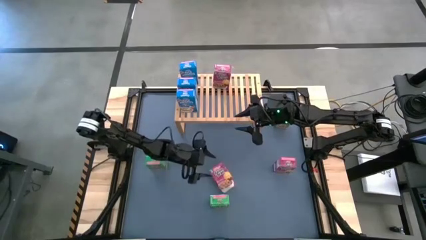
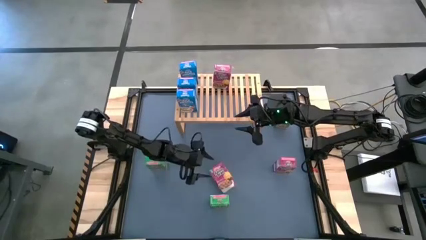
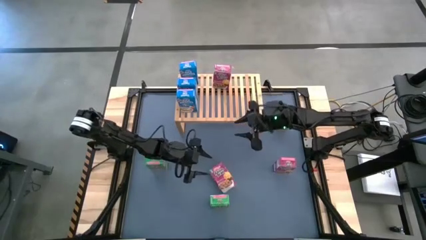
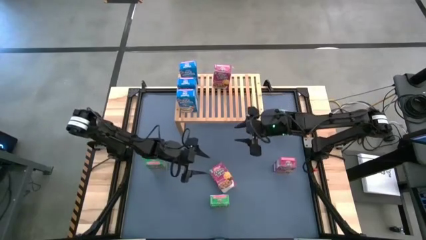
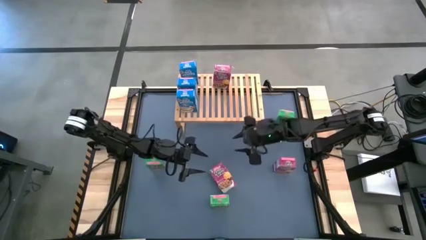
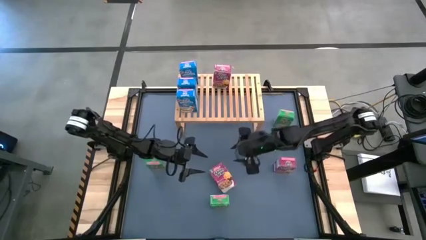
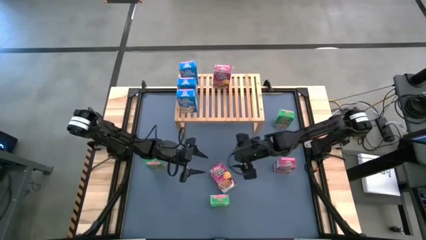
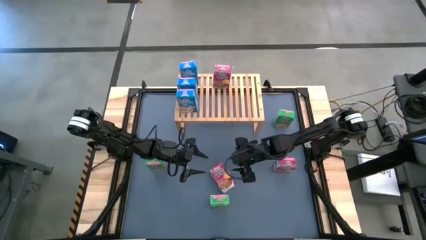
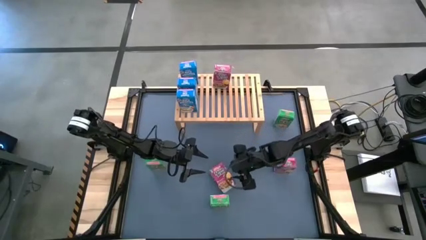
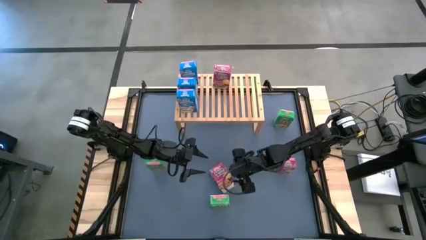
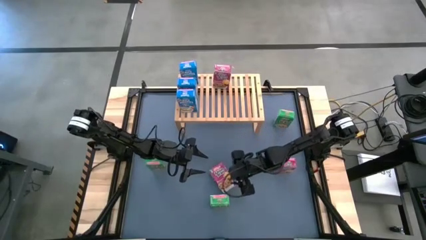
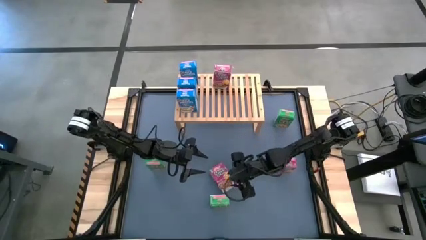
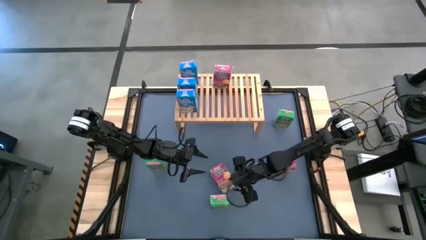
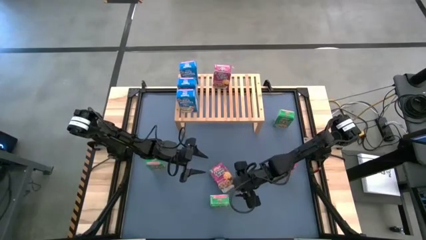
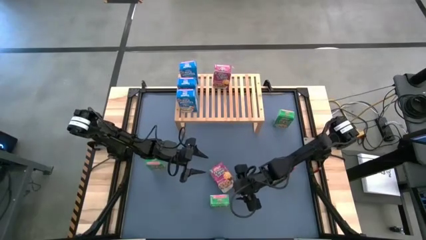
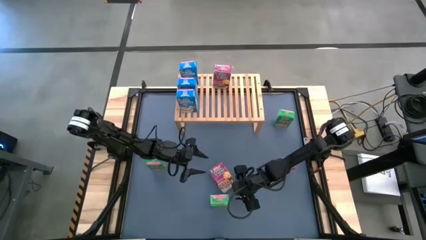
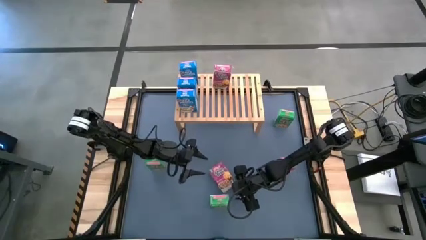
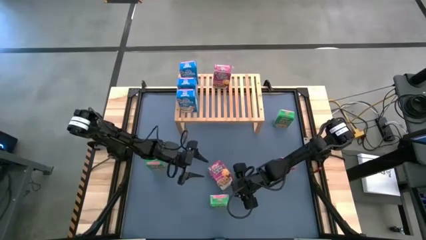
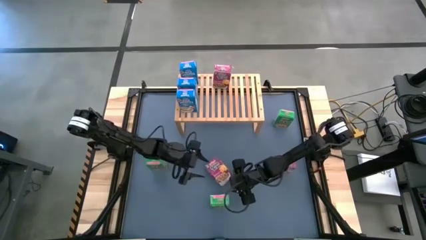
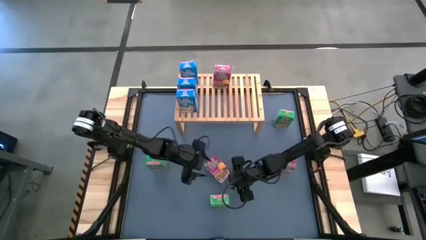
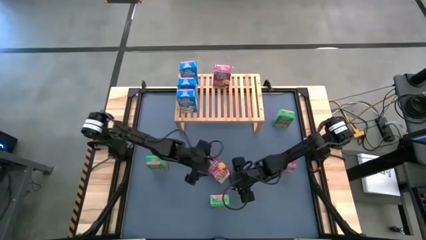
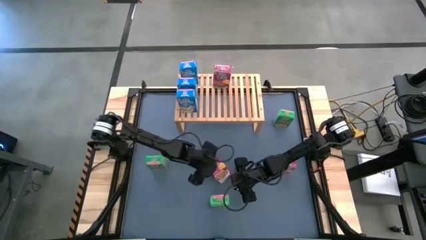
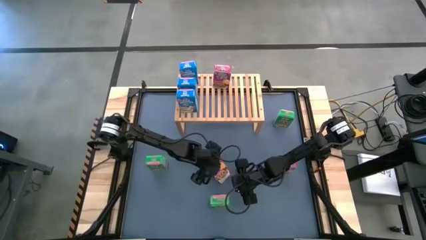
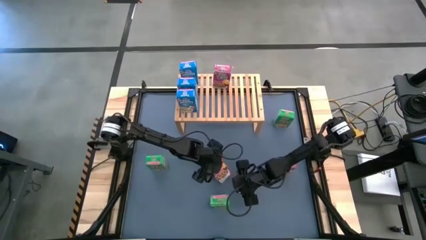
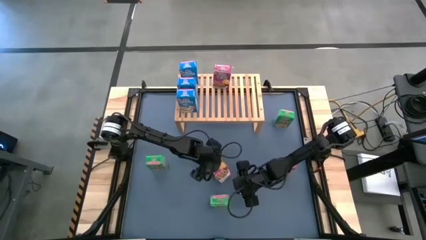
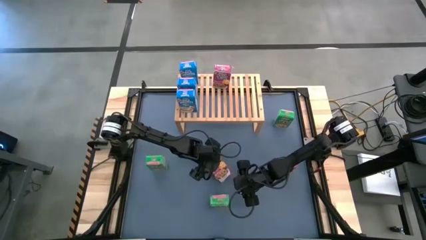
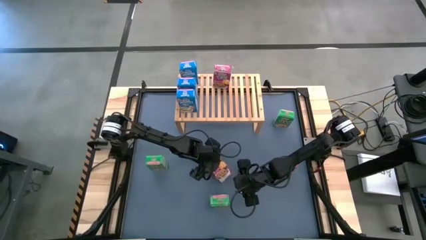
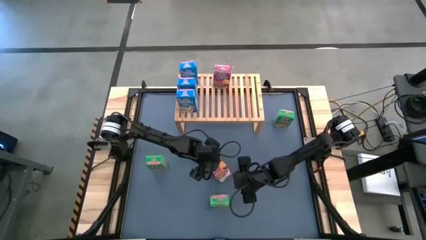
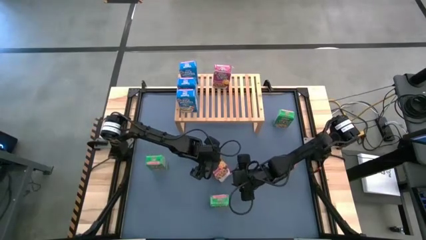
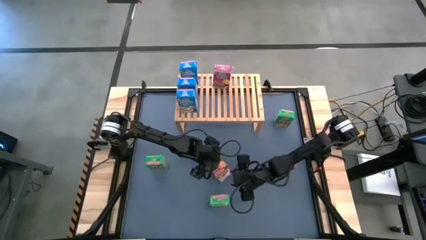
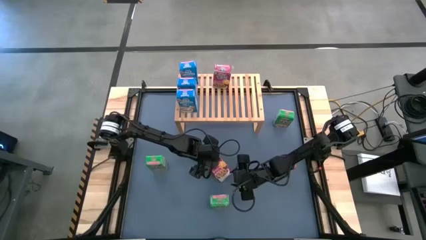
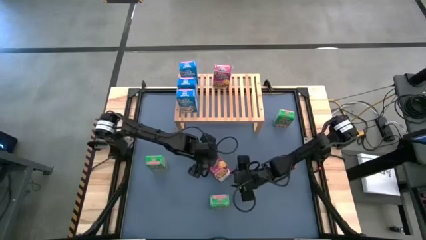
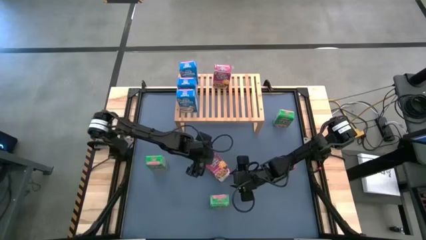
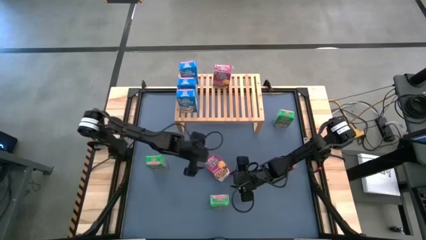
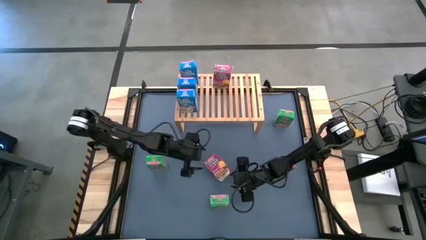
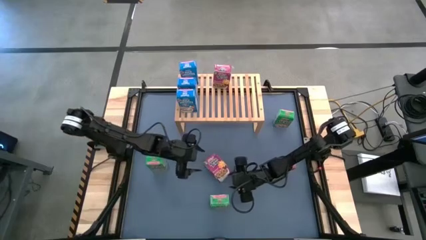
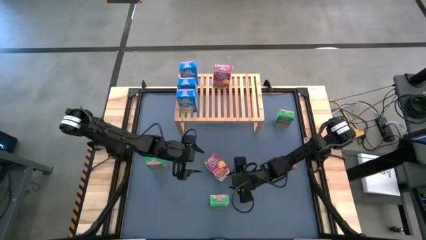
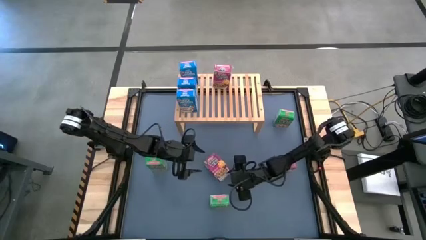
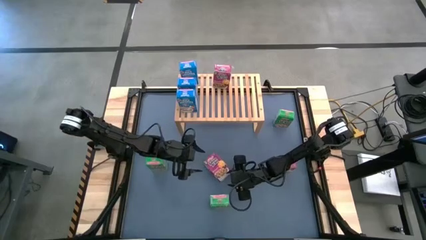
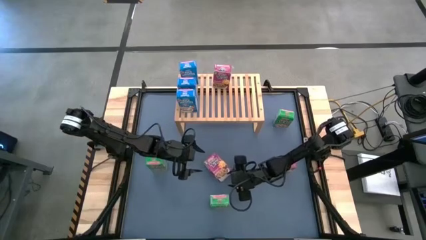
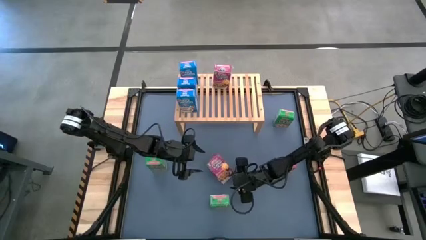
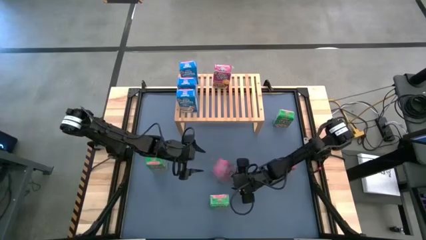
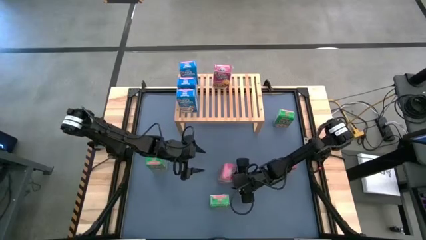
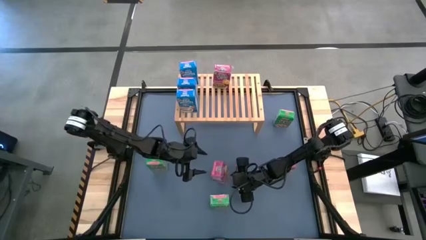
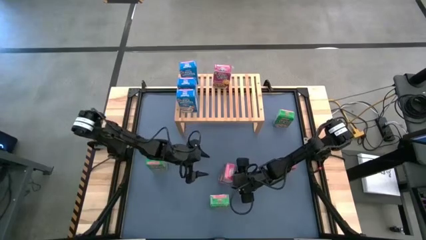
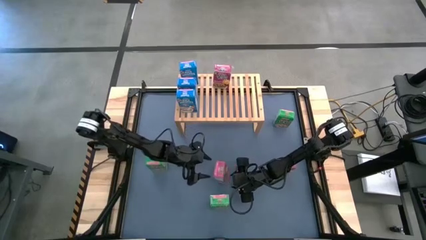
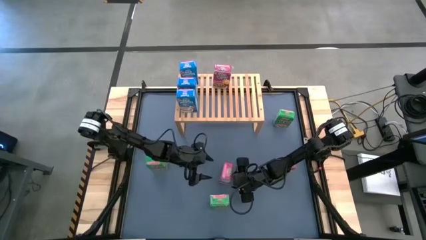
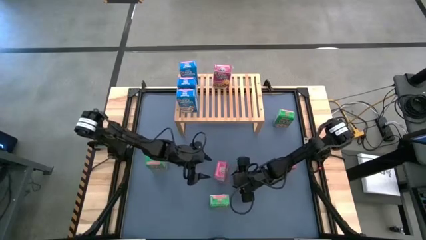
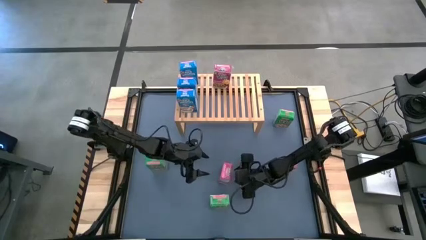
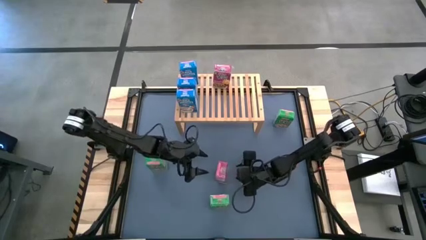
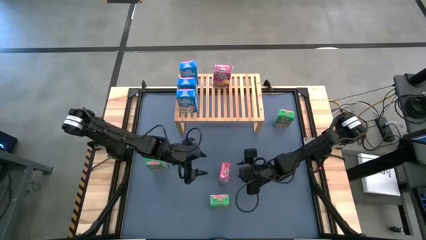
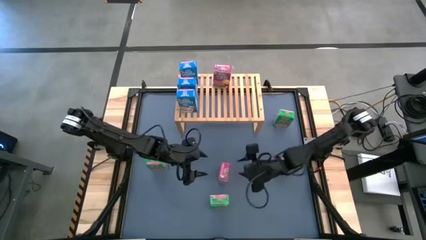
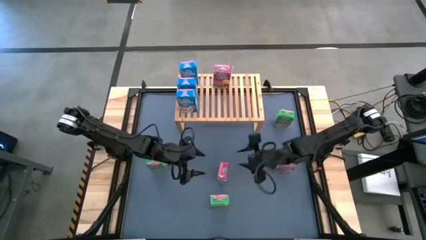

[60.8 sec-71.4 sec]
Task: Stack cereal on shelf
Put the left pink cereal box on the shelf aligned with the other pink cereal box

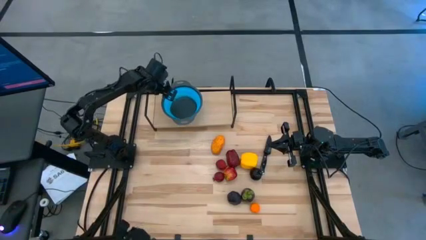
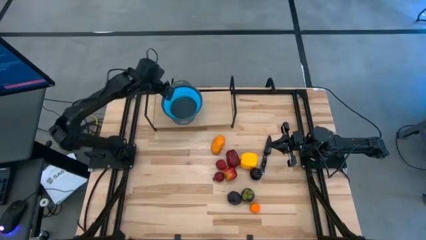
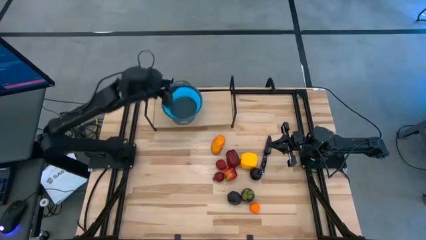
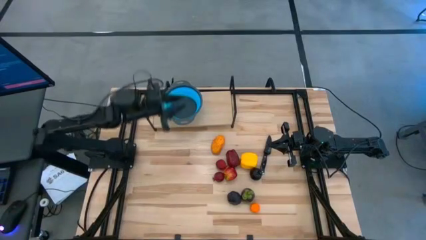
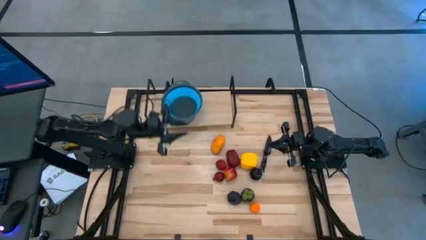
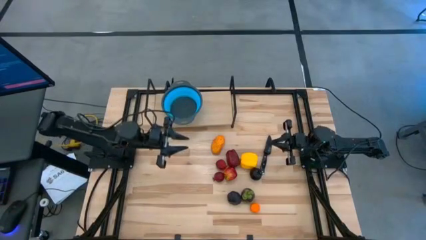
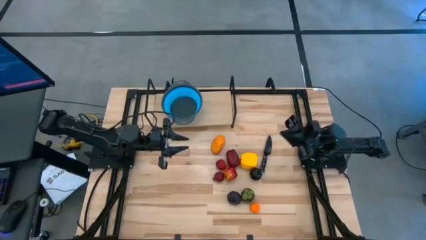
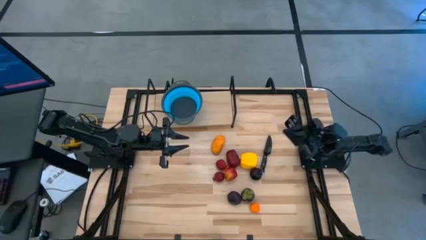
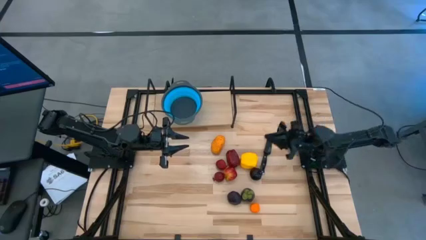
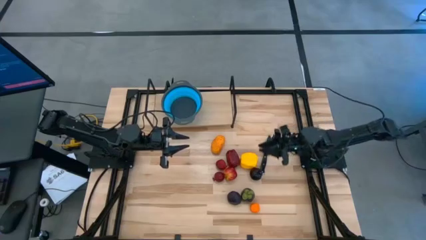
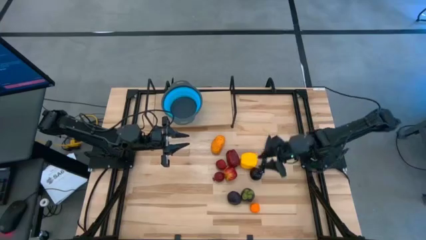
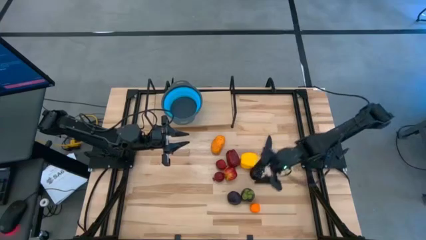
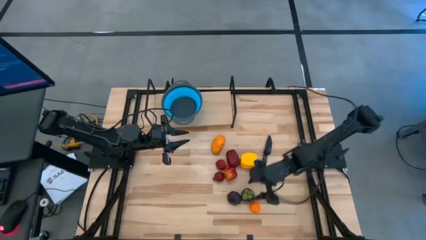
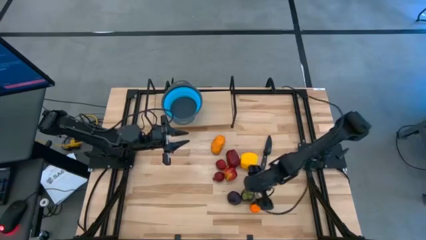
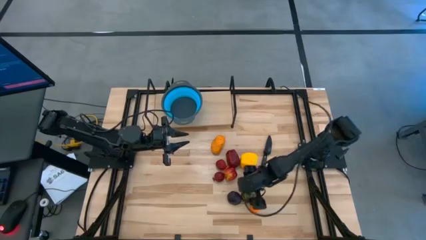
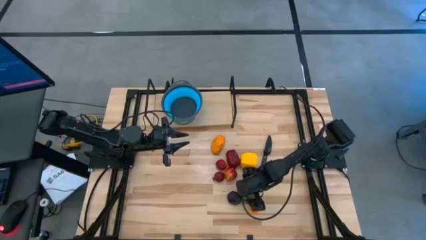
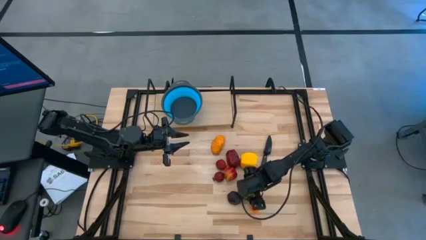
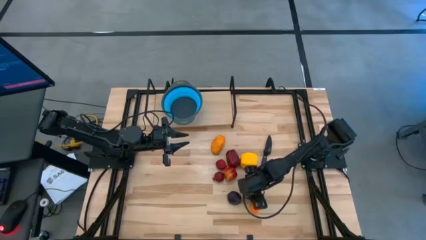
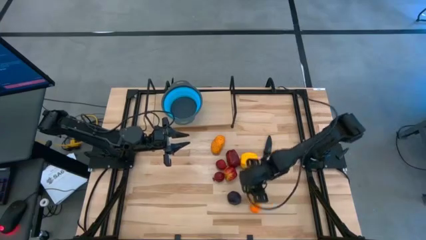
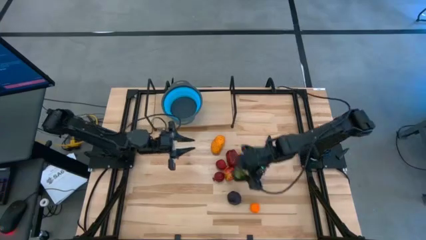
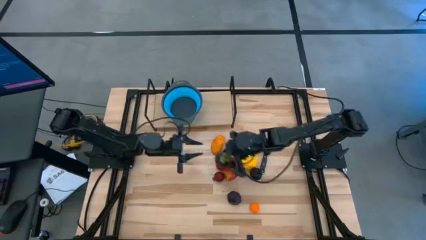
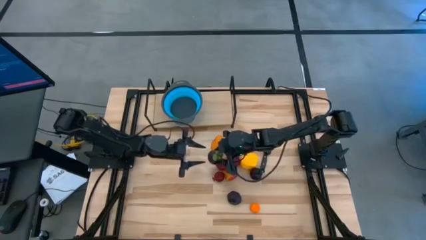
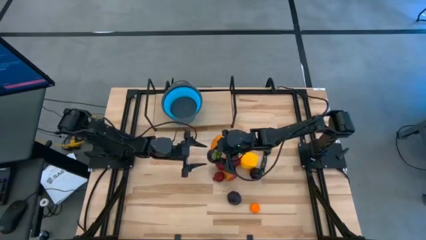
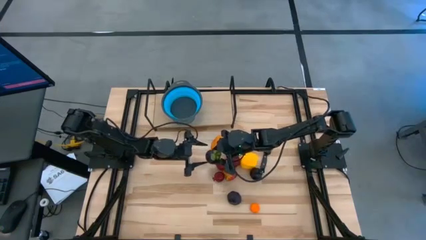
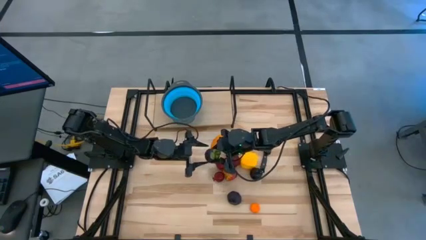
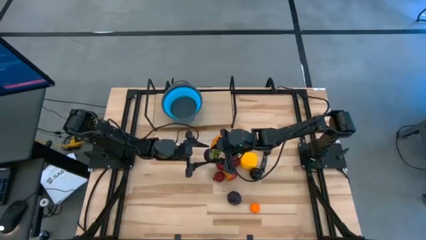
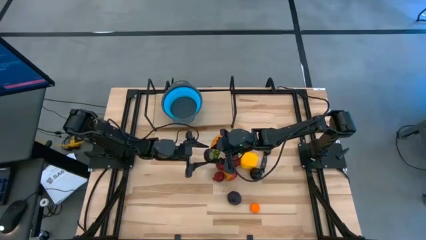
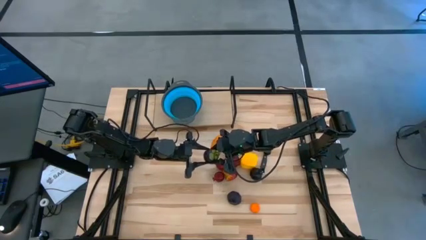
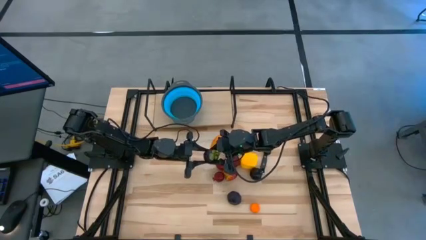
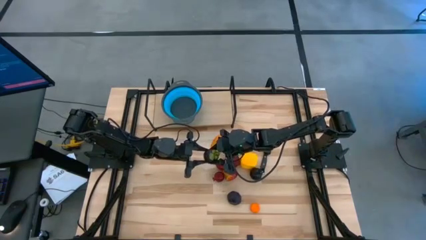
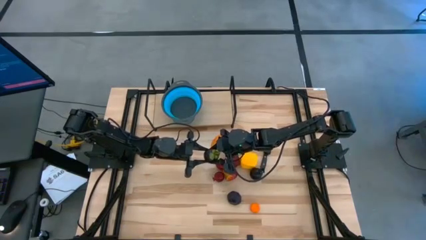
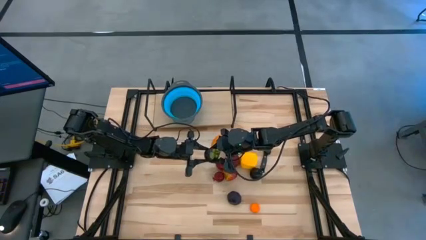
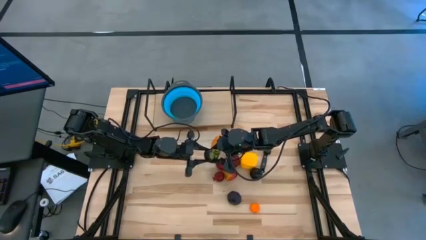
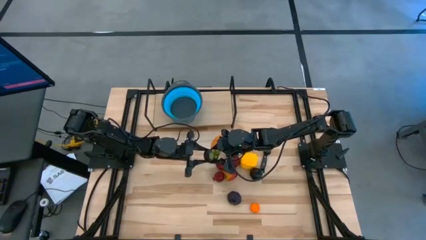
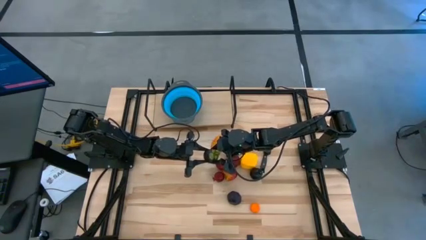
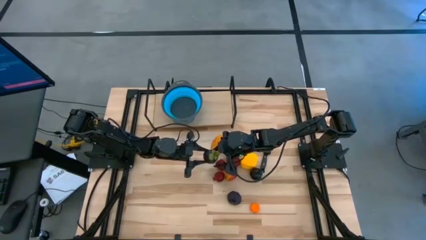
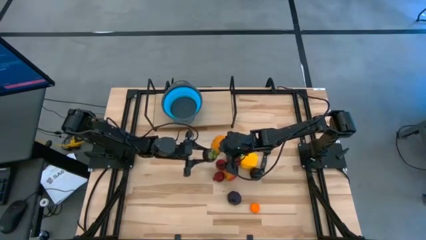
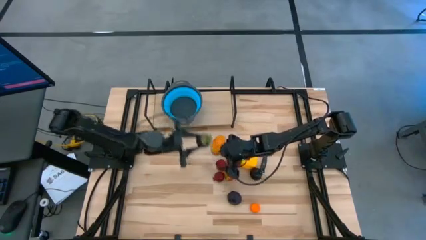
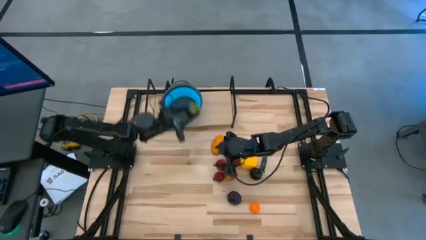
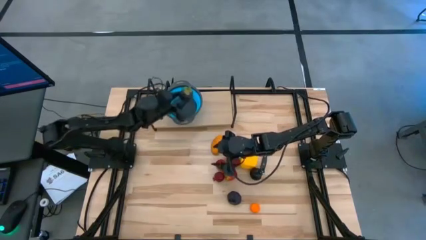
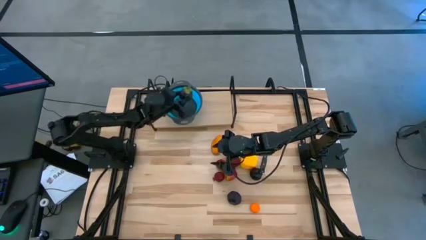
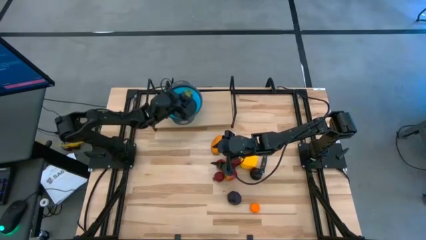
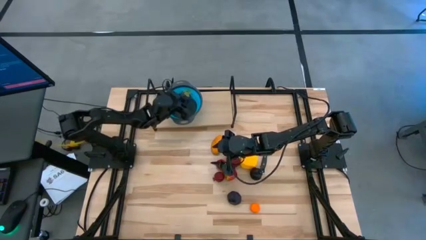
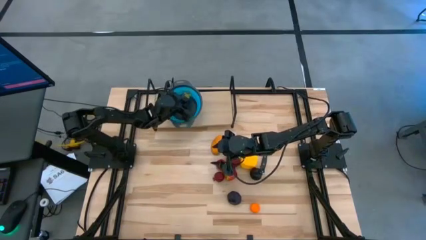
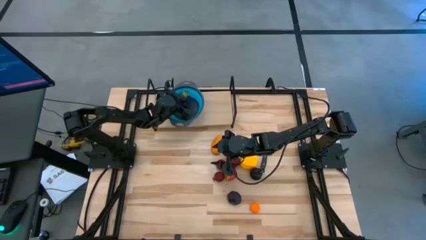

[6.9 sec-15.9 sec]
Task: Pick & Place Fruit
Put the mangosteen into the blue strainer bowl on the shelf
